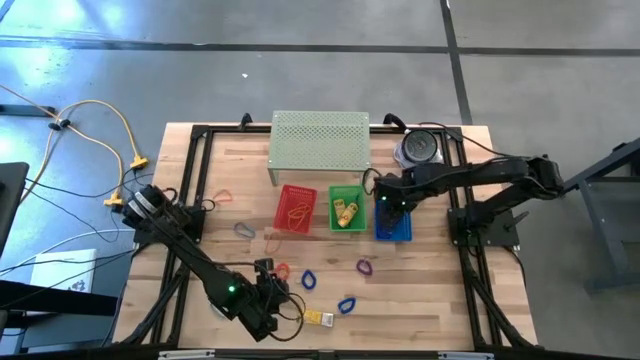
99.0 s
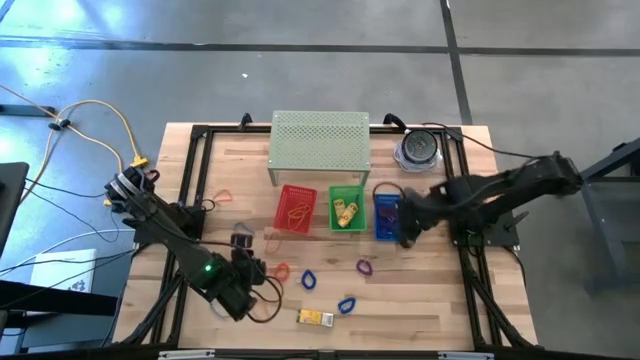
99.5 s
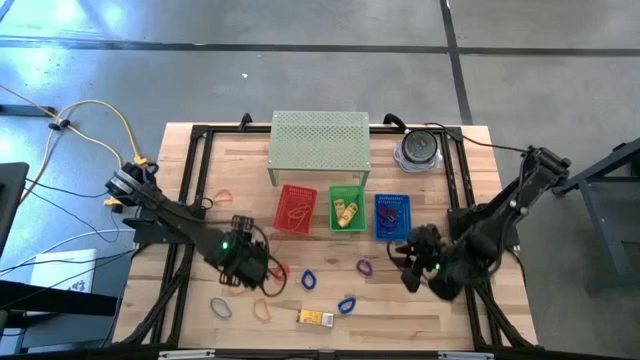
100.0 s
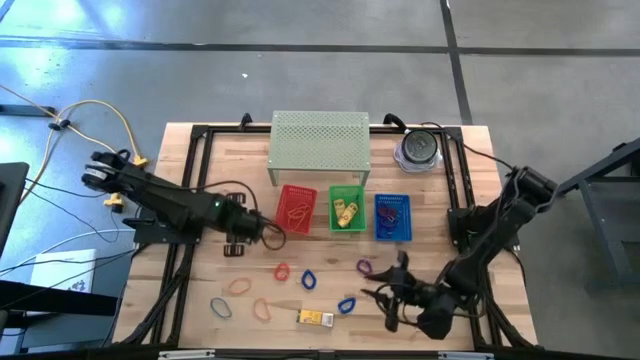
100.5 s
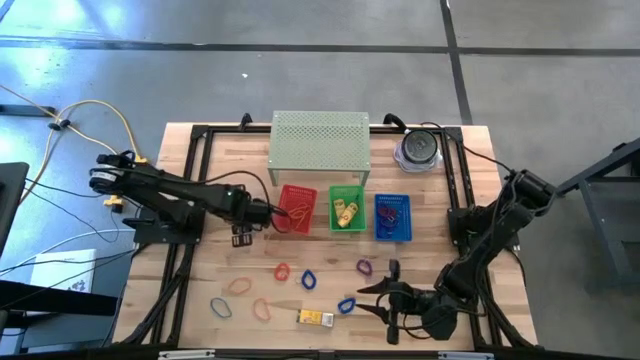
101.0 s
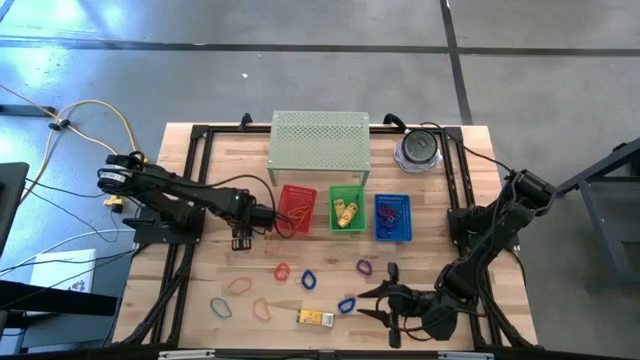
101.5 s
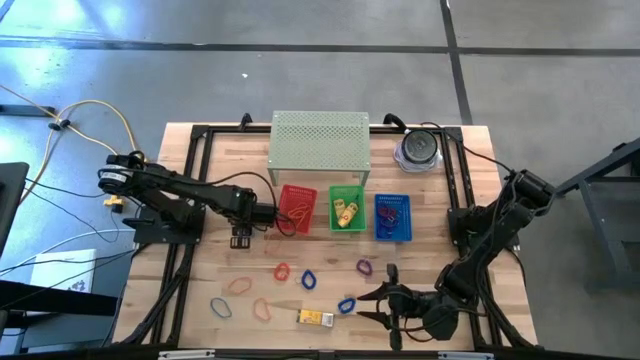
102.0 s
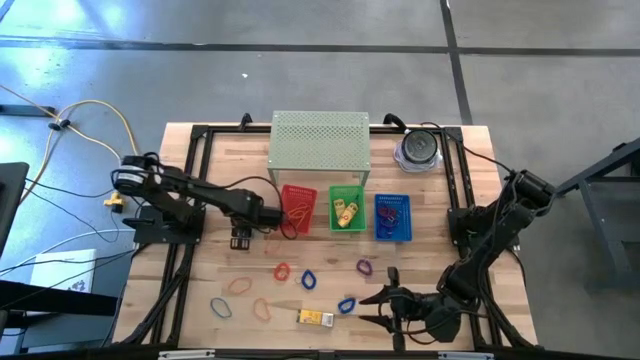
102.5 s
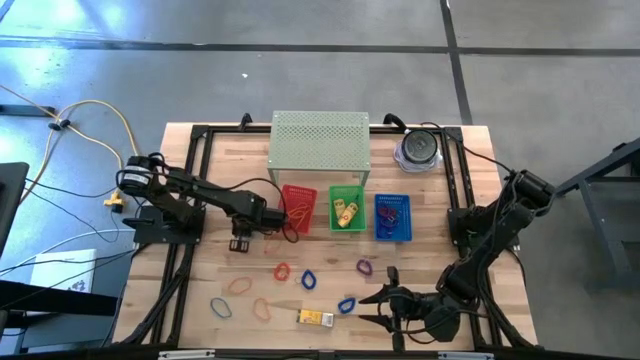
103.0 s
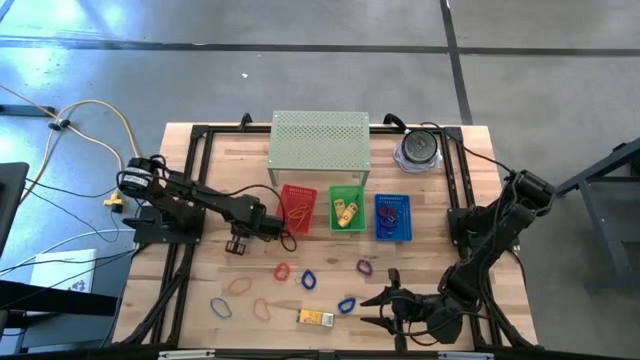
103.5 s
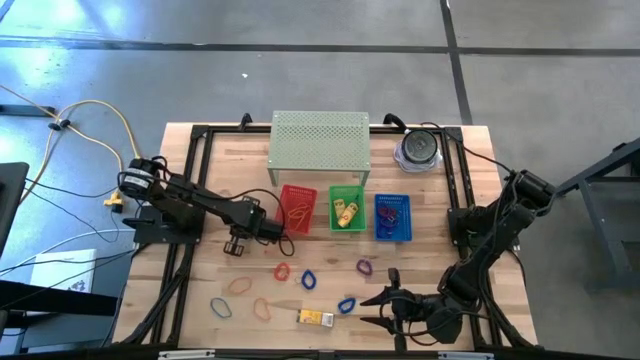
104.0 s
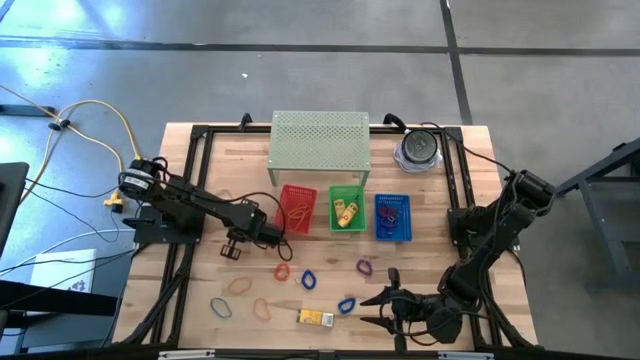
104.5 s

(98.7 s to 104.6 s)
Task: Pick & Place Office Desk Supplies
Put the top blue rubber band into the red bin

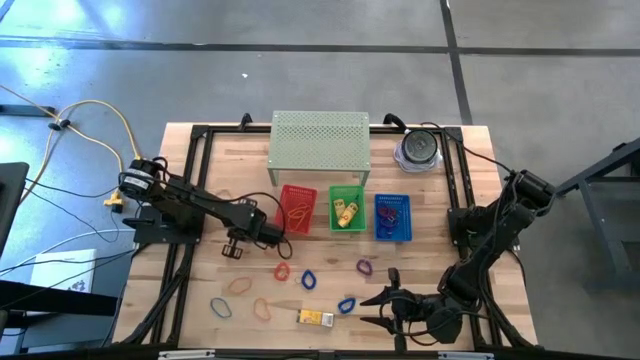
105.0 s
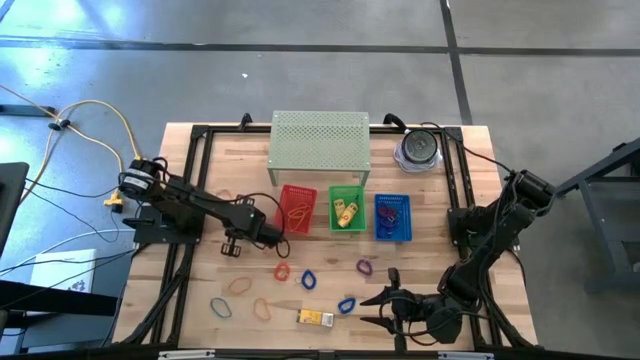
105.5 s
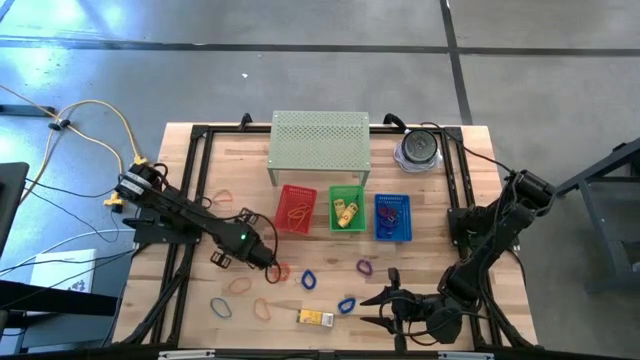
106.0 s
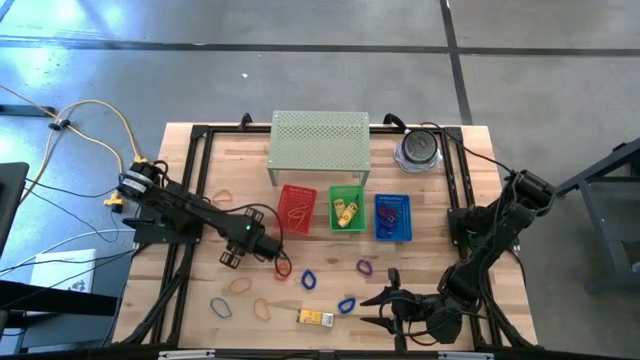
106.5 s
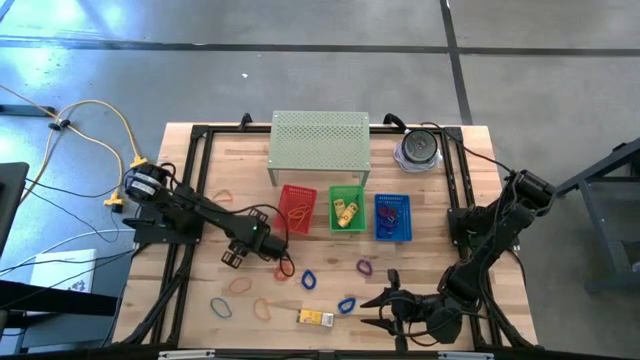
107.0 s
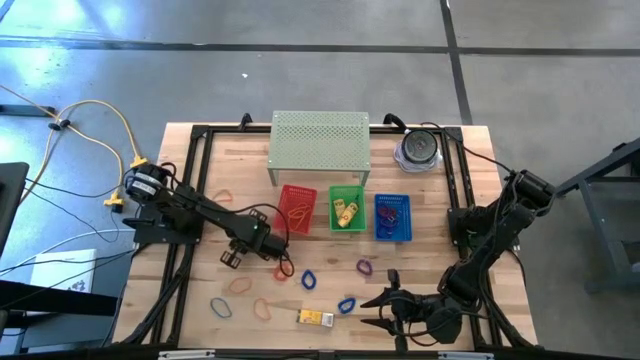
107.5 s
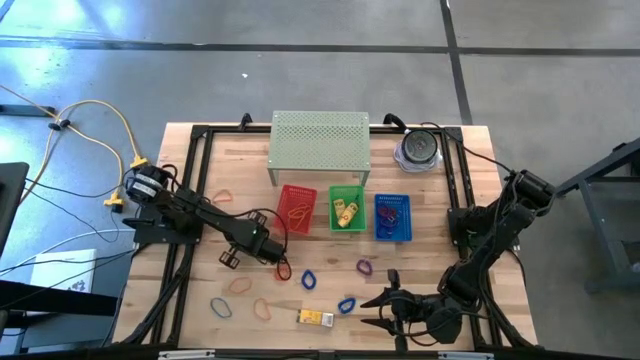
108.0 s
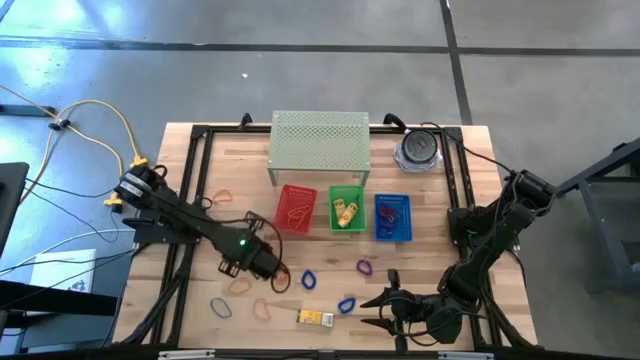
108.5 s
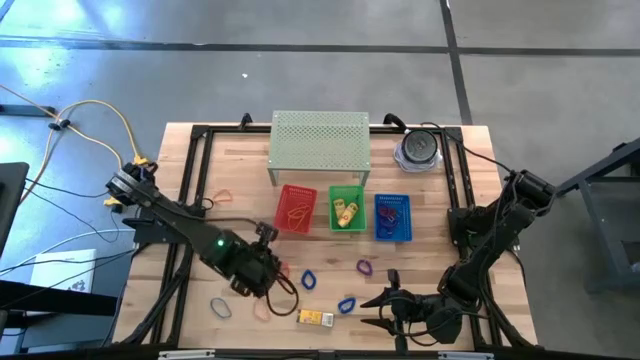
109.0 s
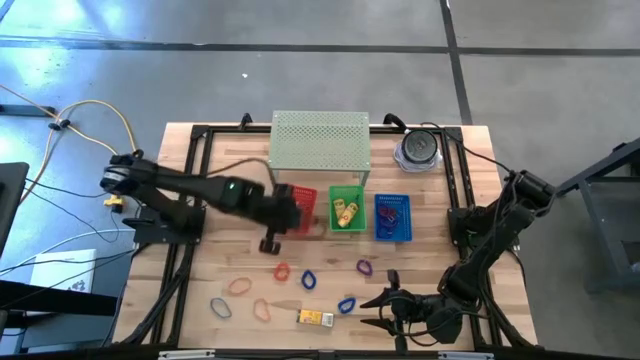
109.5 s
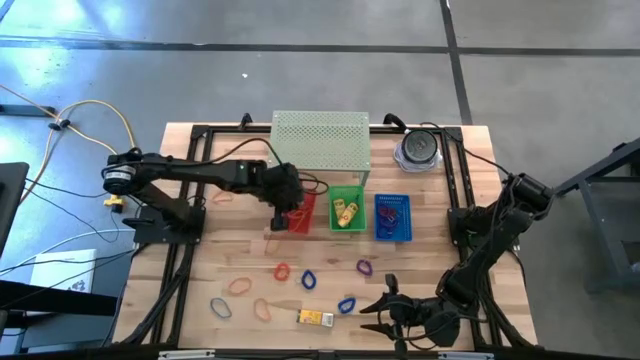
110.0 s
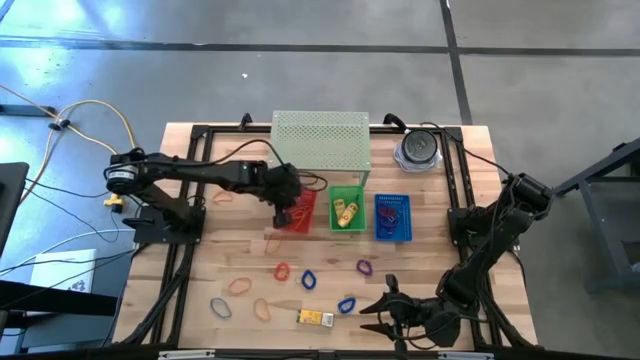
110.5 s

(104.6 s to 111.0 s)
Put the top blue rubber band into the red bin

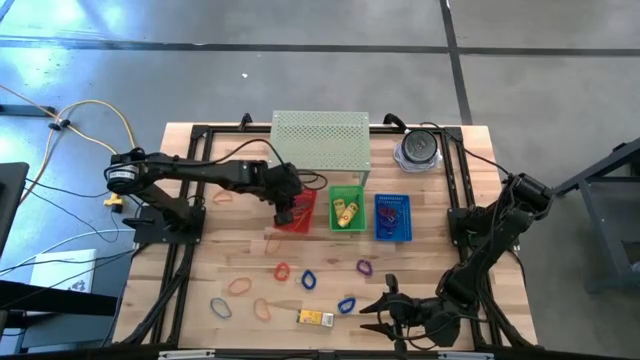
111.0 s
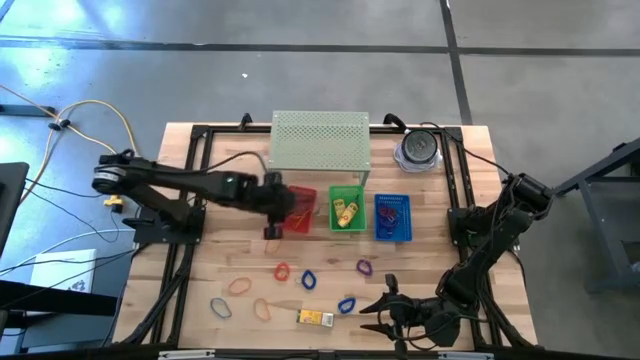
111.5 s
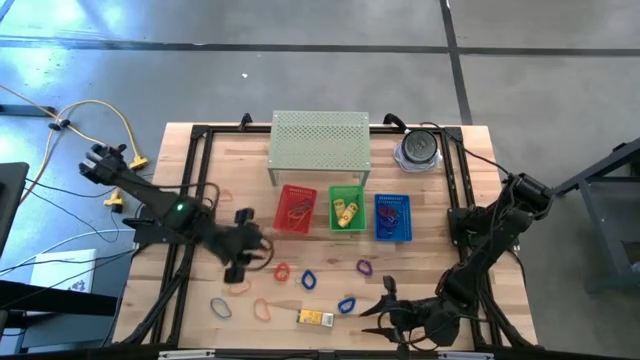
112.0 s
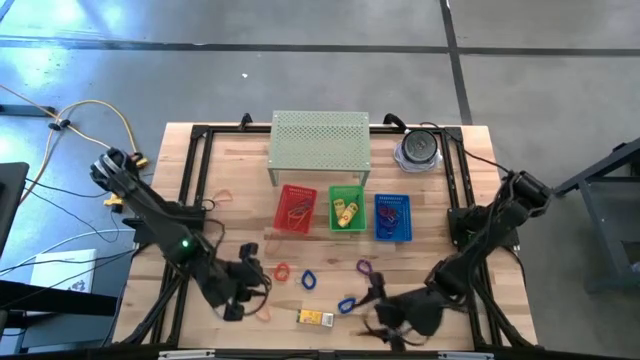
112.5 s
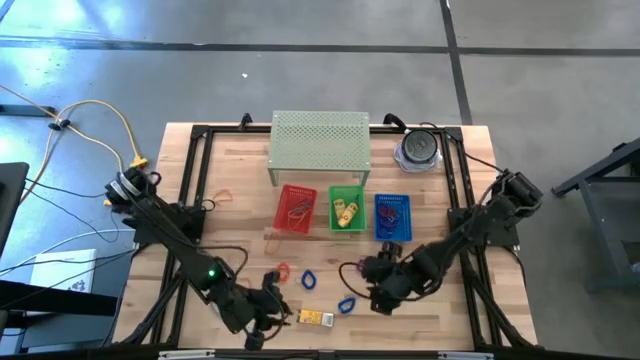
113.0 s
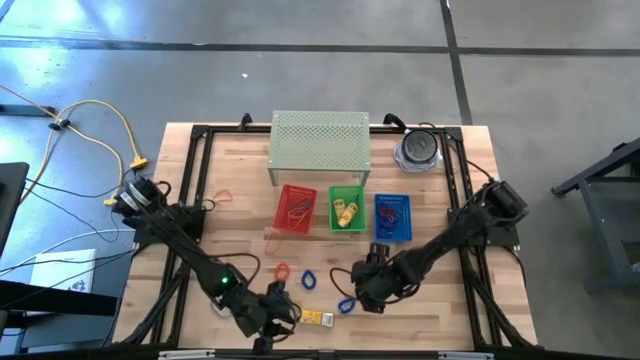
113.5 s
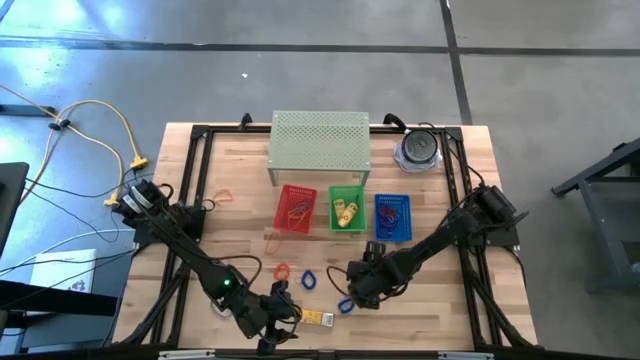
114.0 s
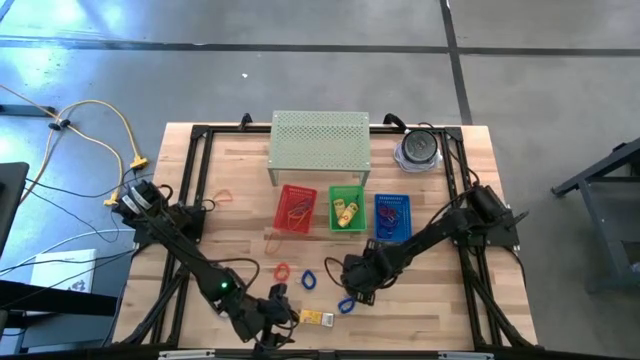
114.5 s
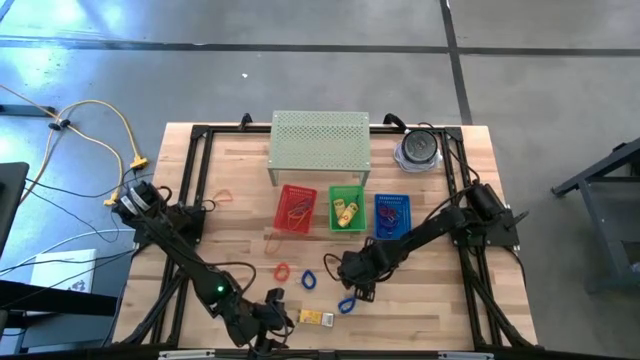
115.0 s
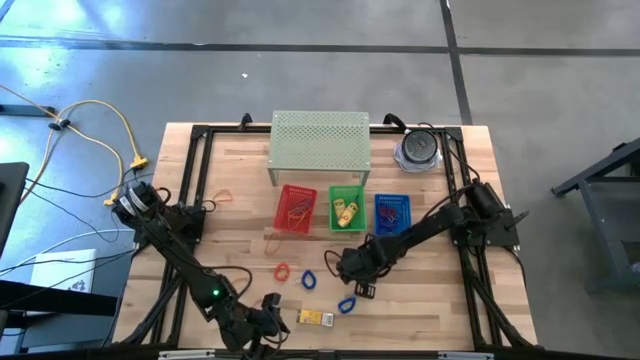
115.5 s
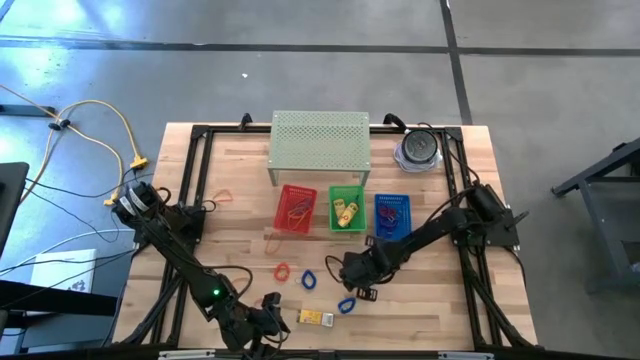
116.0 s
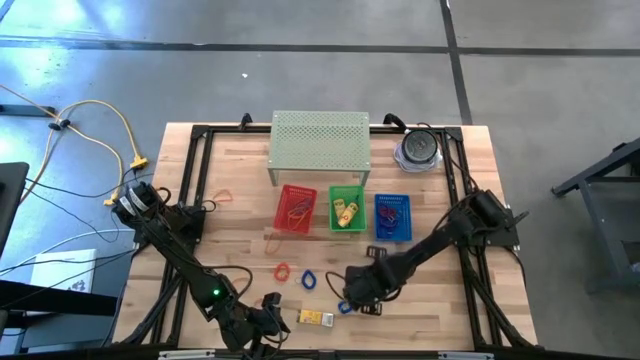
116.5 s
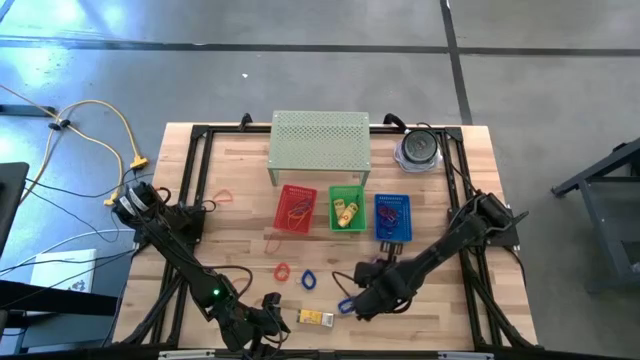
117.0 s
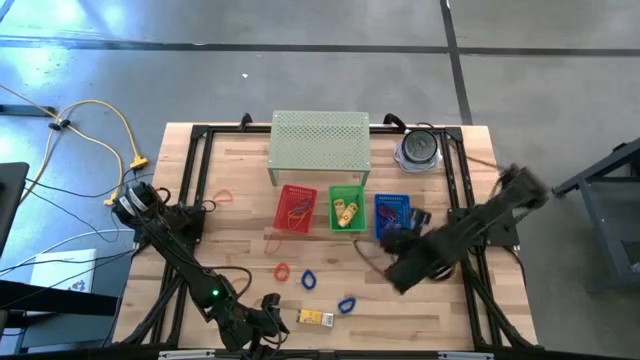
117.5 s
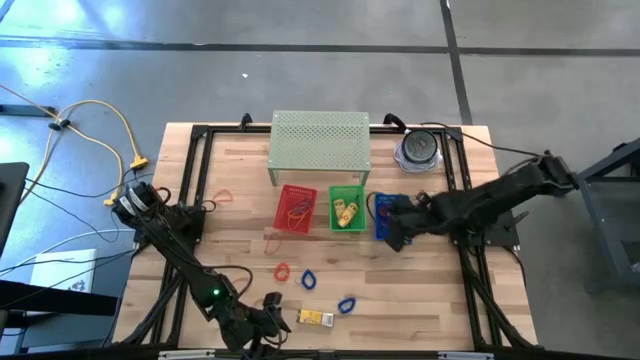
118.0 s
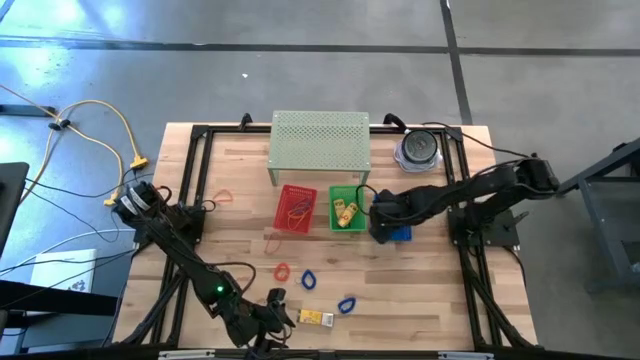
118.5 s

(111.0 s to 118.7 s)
Put the purple spring keychain into the blue bin

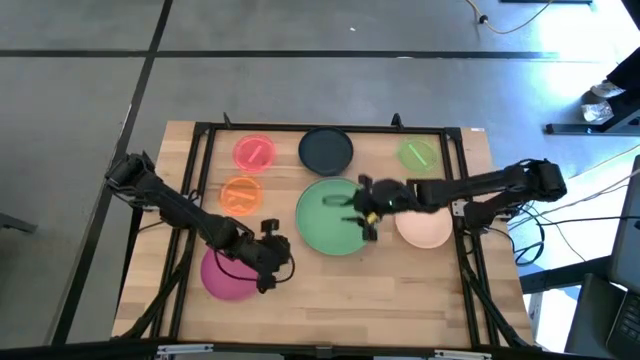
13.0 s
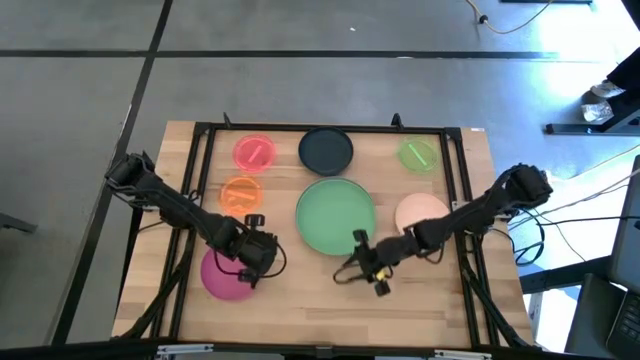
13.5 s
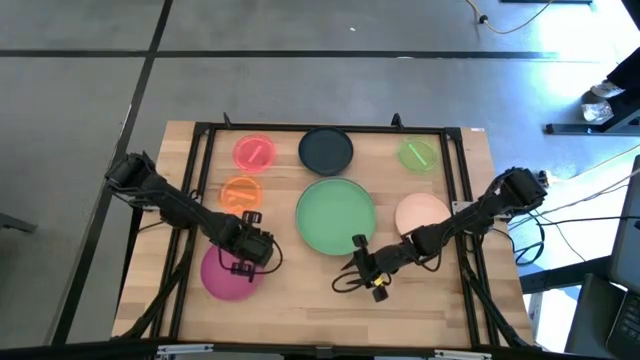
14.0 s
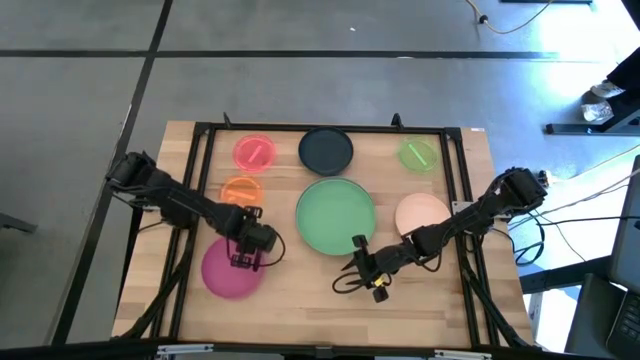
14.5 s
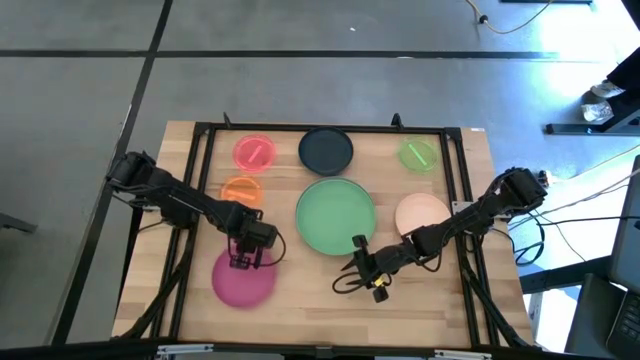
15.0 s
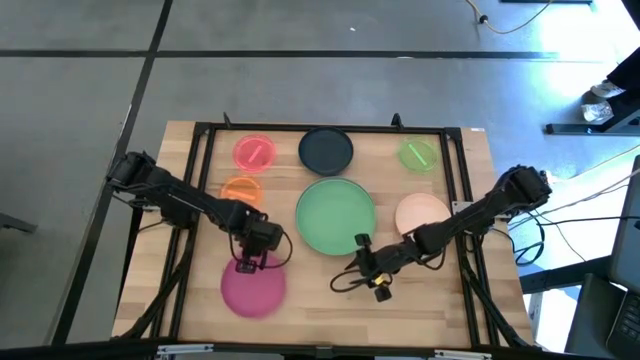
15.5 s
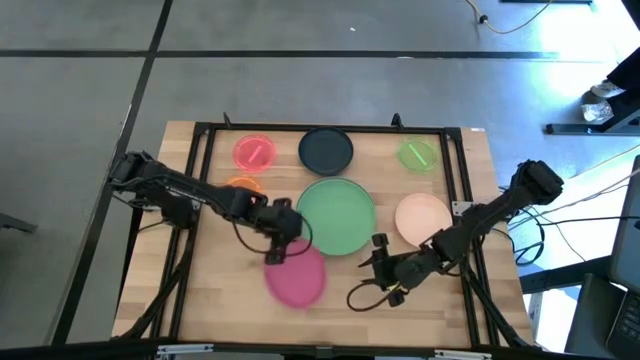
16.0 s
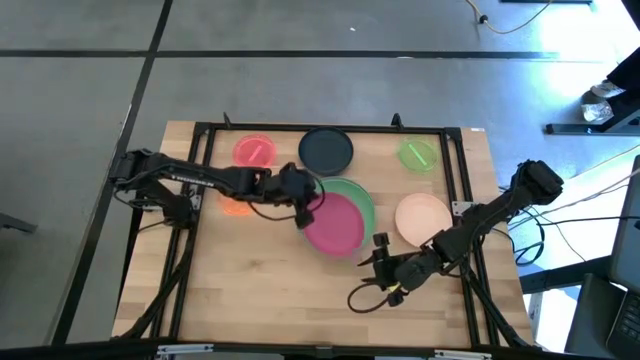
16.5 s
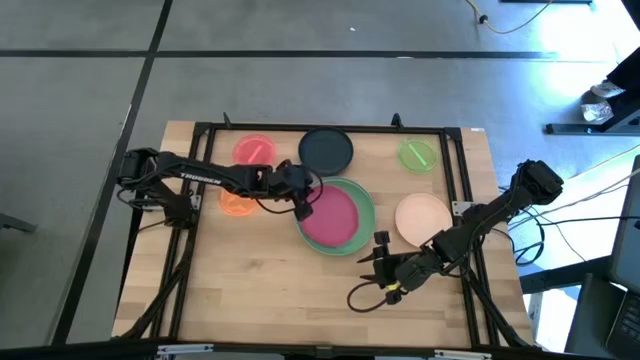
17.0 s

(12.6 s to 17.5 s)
Task: Stack plastic plates
Stack the pink plate on top of the light green plate
